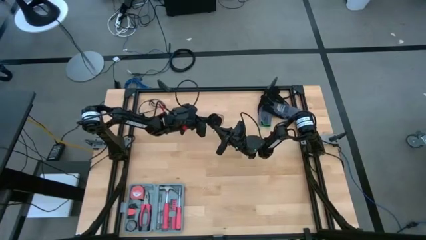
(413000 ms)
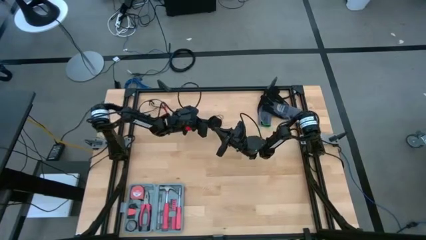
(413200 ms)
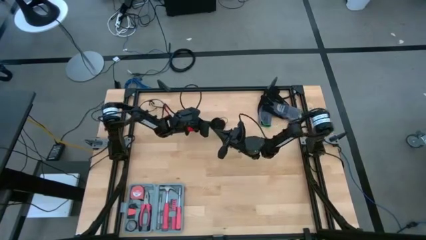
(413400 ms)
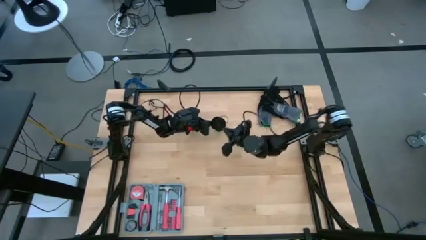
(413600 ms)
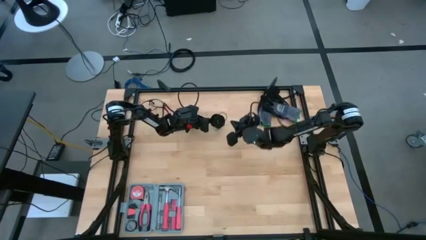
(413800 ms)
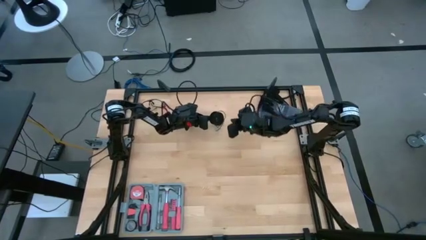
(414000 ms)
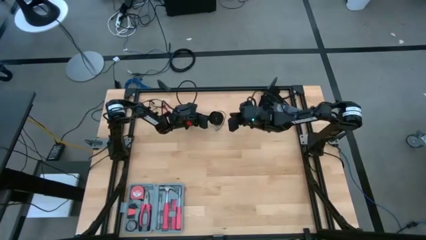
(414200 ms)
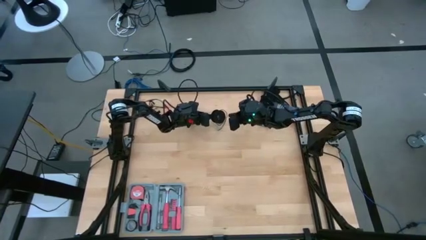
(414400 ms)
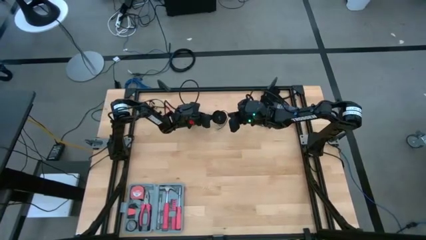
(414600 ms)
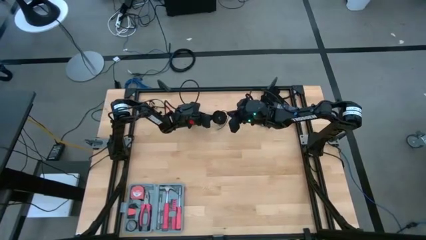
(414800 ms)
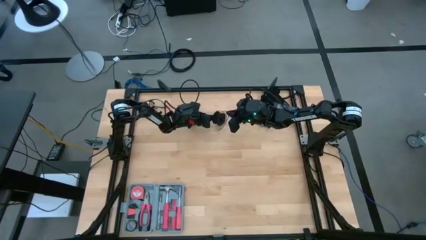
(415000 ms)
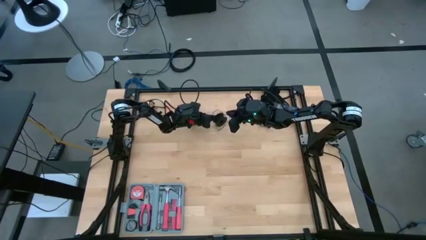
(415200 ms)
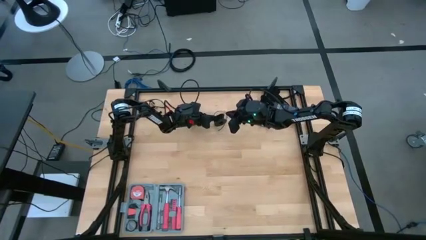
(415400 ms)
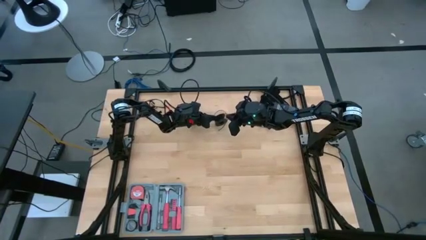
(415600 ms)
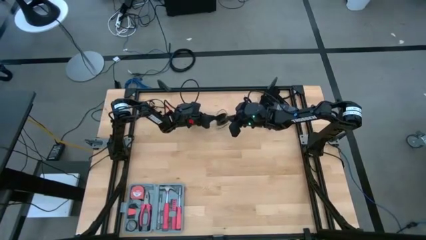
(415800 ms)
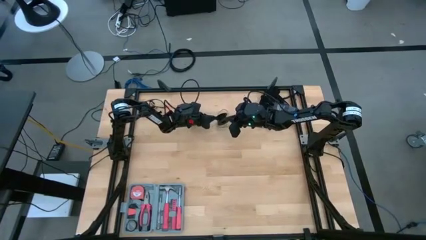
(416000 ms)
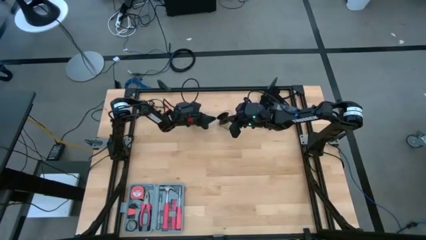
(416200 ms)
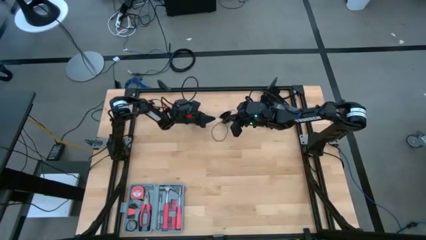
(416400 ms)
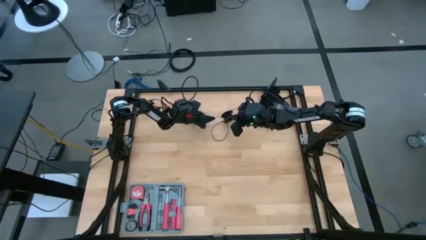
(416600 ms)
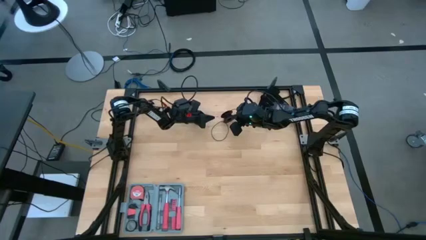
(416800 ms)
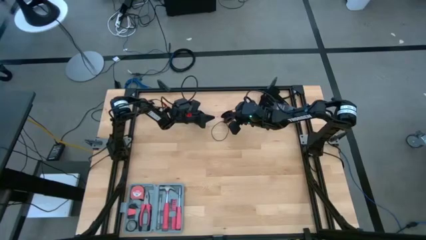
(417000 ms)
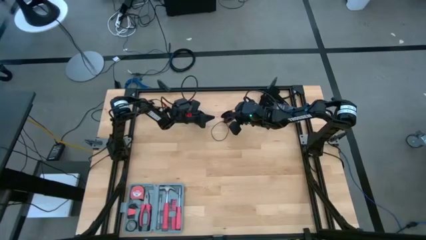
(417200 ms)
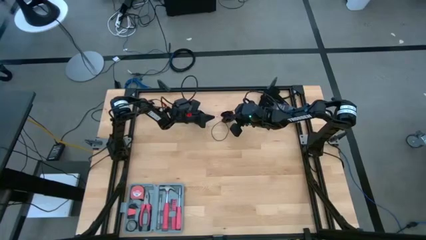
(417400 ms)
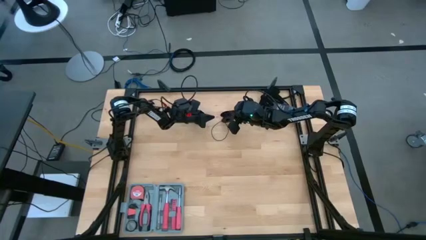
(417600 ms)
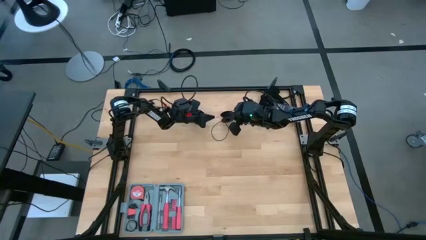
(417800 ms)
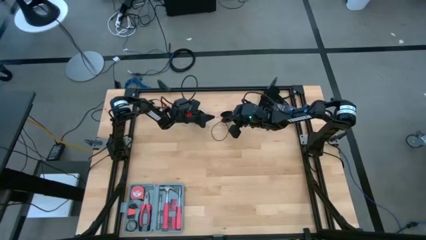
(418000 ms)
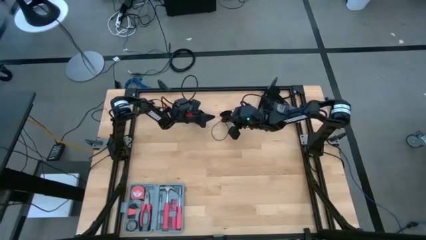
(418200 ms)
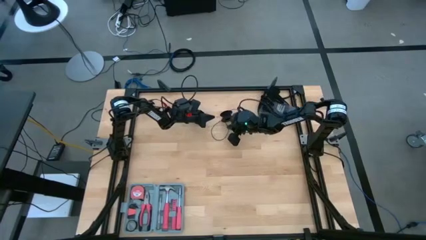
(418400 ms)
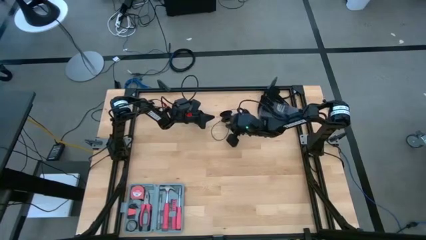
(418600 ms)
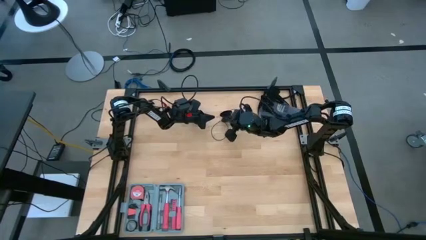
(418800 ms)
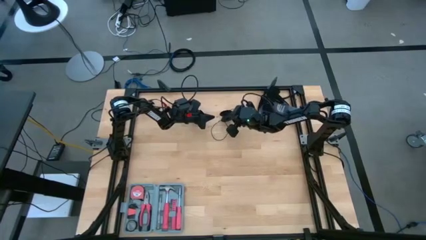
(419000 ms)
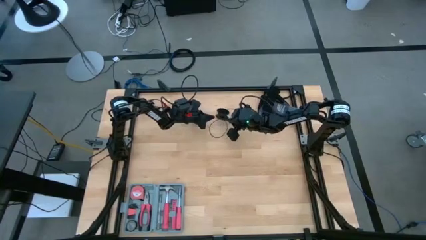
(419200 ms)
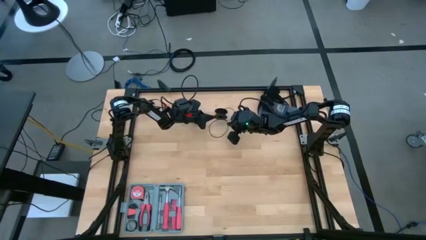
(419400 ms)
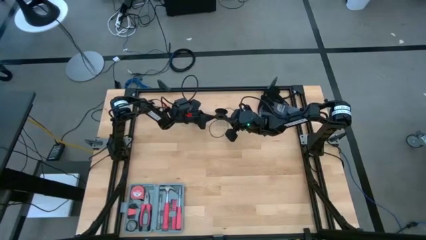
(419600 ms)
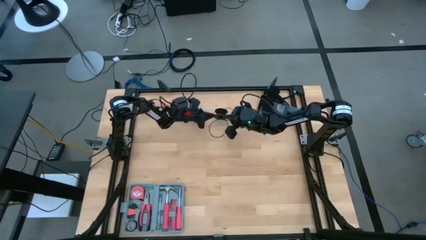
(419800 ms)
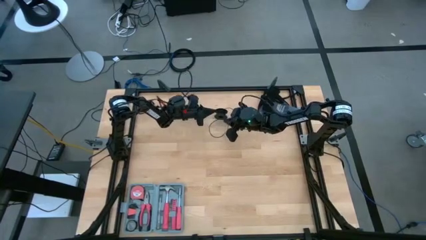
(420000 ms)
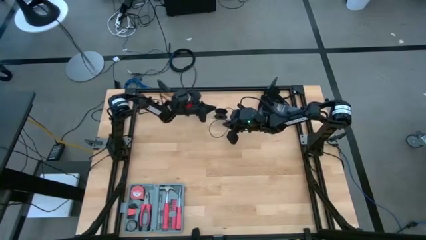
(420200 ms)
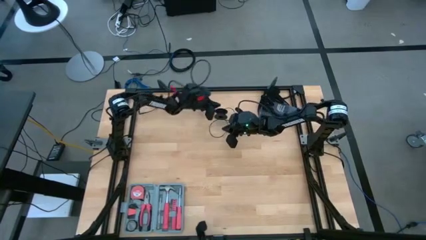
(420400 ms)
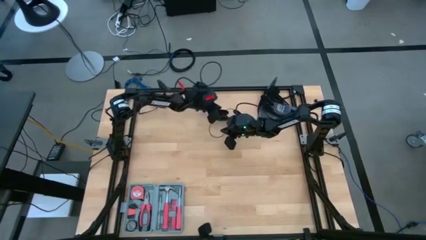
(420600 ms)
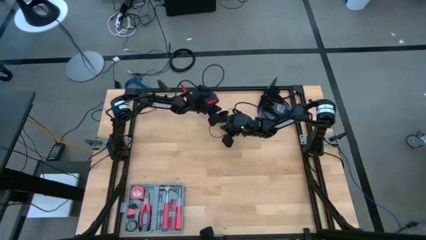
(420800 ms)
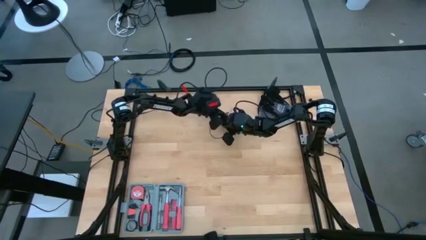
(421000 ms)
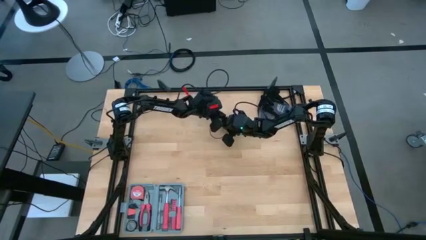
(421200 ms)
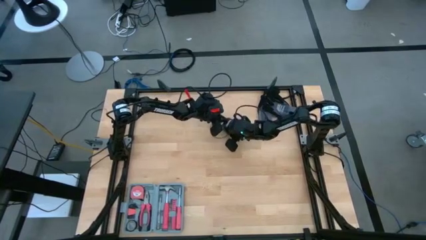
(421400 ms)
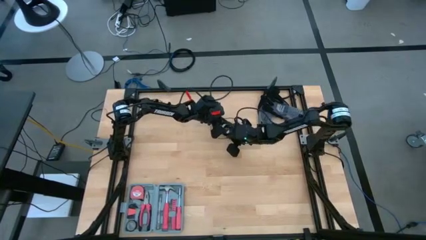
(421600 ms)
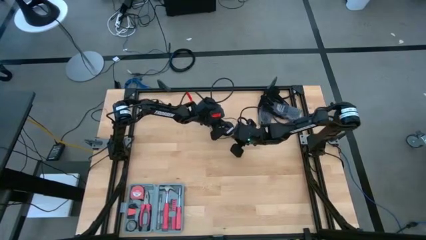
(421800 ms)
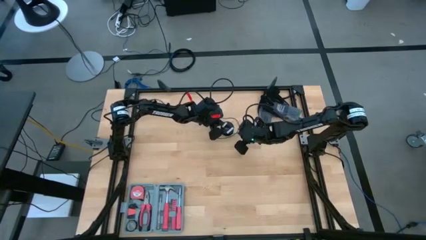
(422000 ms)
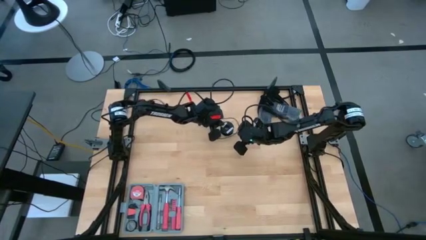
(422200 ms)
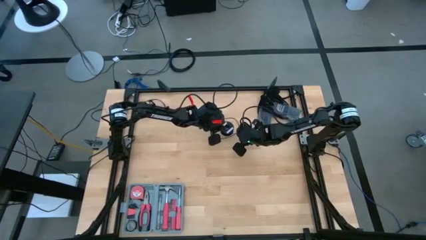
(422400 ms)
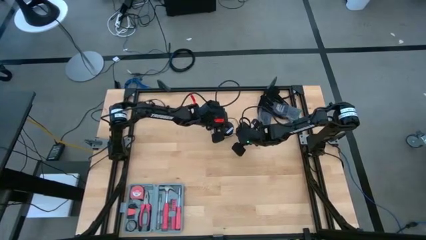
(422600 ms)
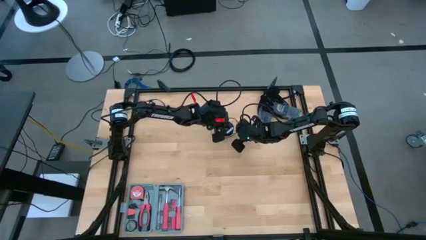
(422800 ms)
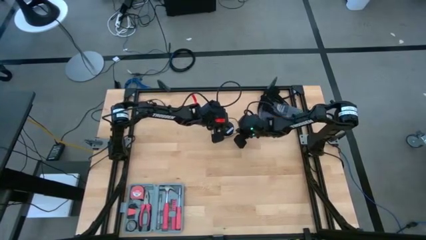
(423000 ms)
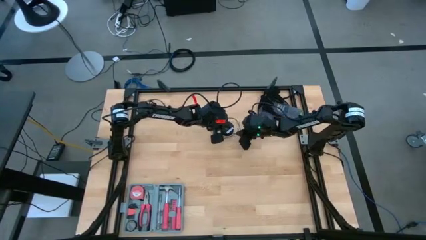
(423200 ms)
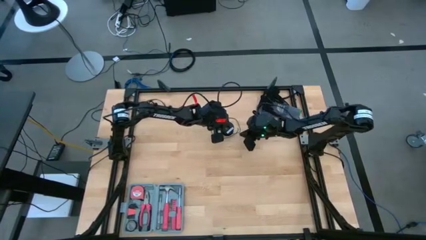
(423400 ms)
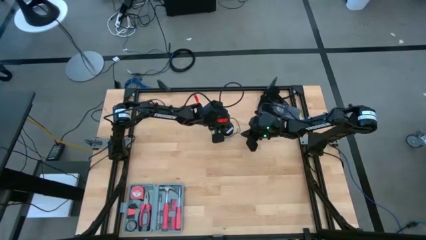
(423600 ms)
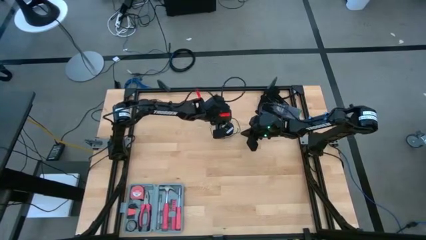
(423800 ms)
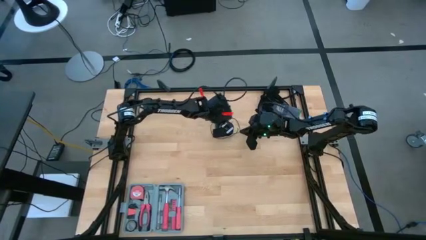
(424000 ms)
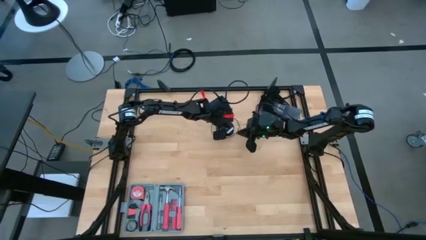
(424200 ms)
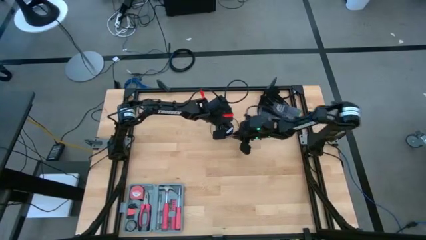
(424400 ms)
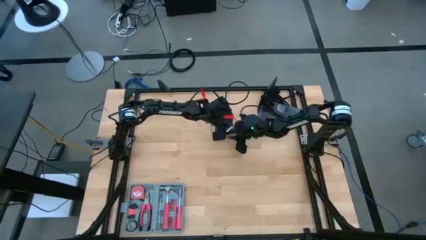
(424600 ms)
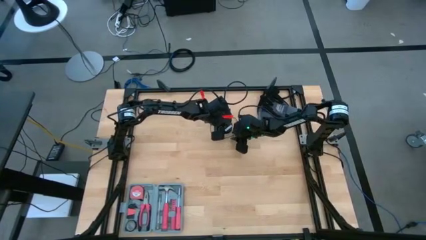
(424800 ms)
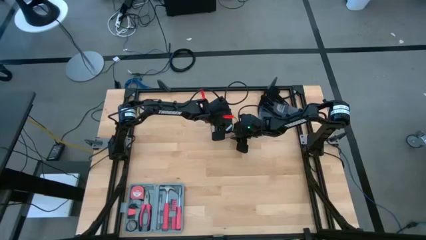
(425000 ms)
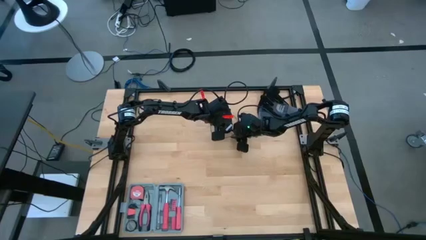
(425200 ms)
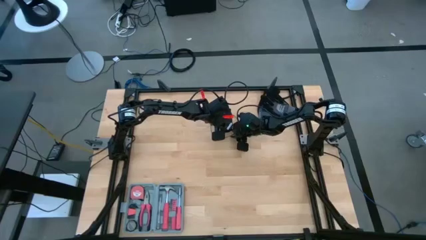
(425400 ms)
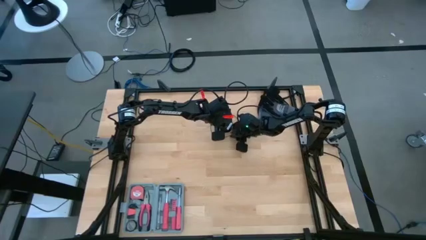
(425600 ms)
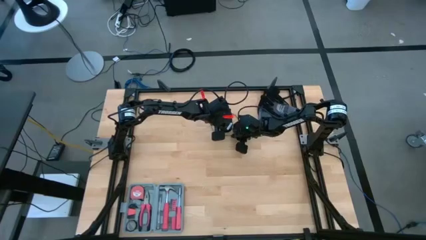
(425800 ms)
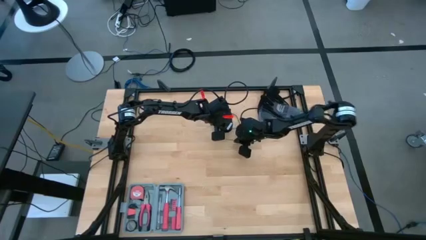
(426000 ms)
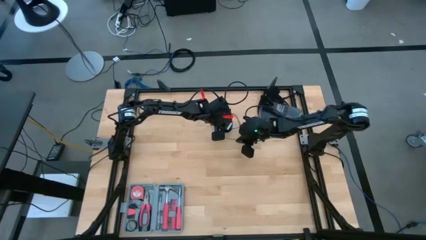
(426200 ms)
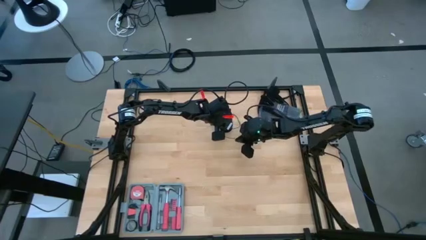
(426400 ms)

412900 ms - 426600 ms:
Task: Coil cords
Uncoil the black wire from the black spool
